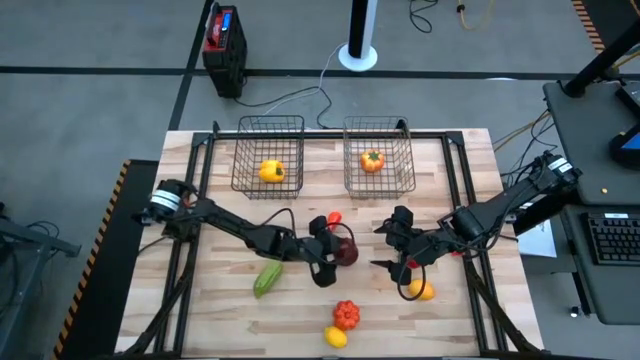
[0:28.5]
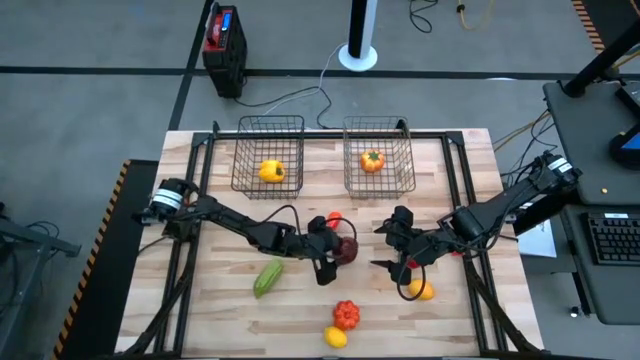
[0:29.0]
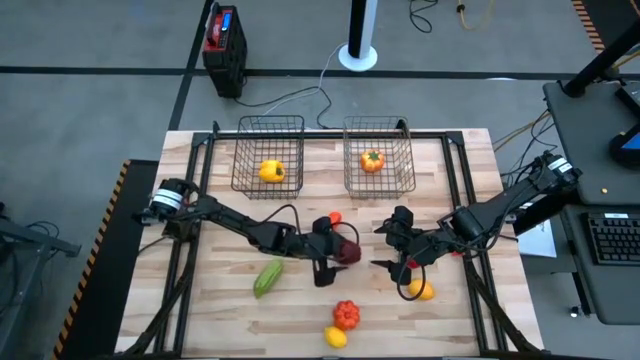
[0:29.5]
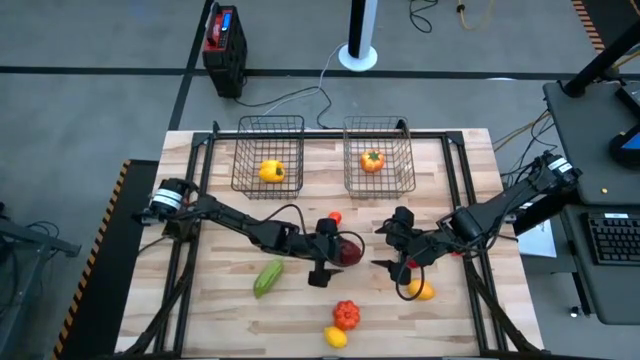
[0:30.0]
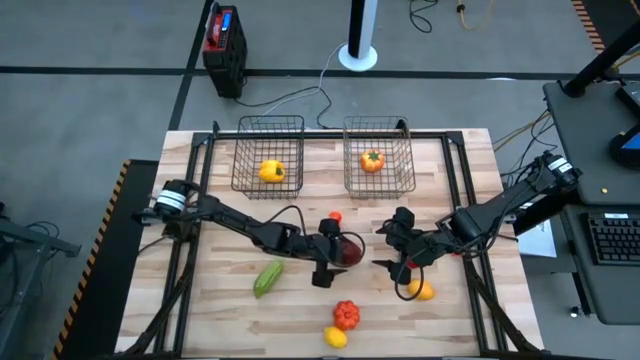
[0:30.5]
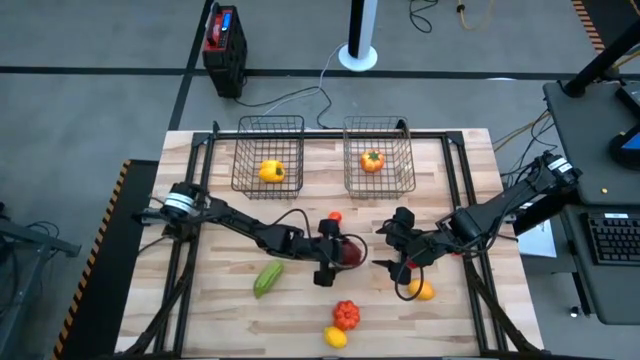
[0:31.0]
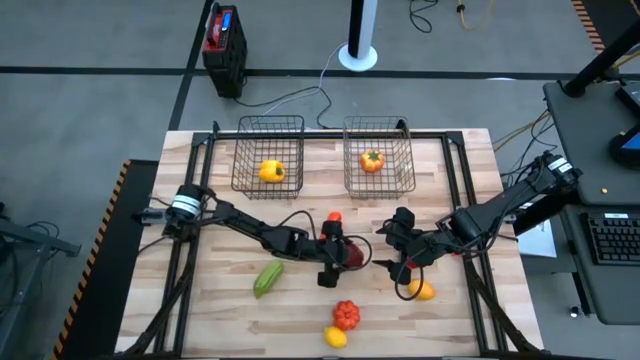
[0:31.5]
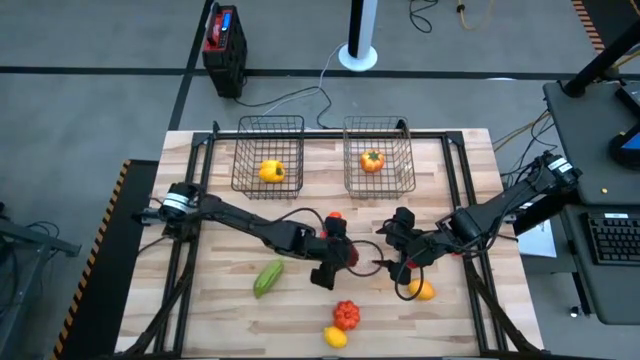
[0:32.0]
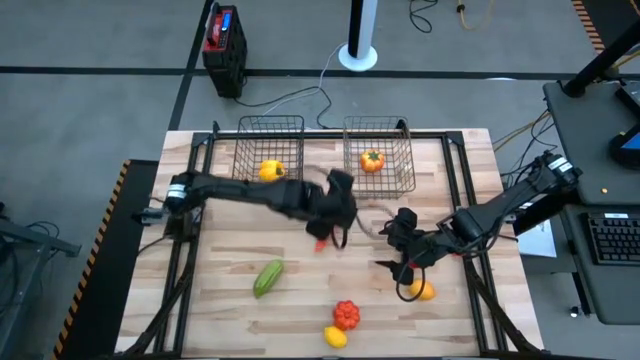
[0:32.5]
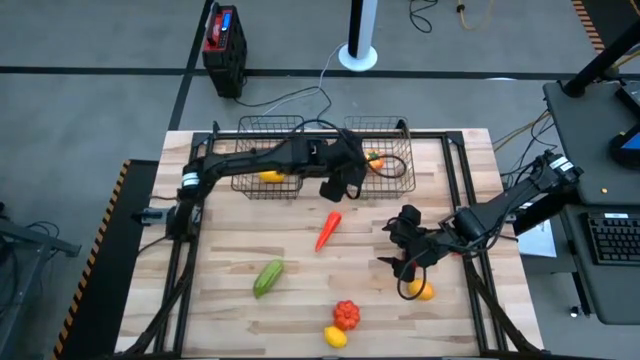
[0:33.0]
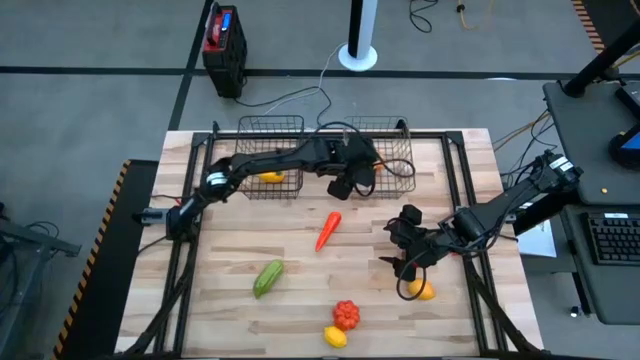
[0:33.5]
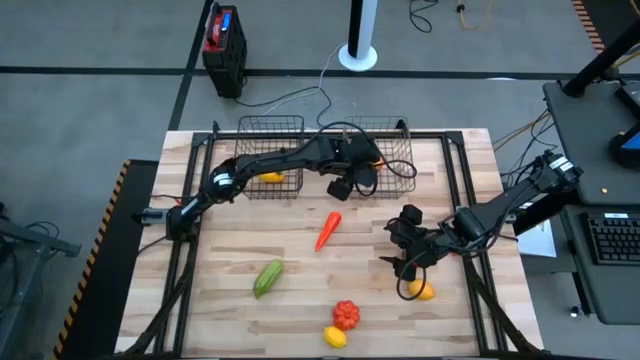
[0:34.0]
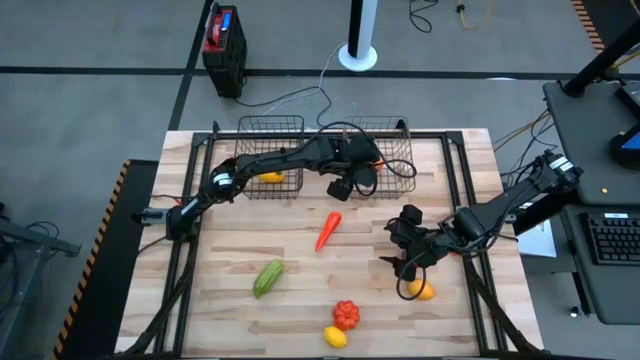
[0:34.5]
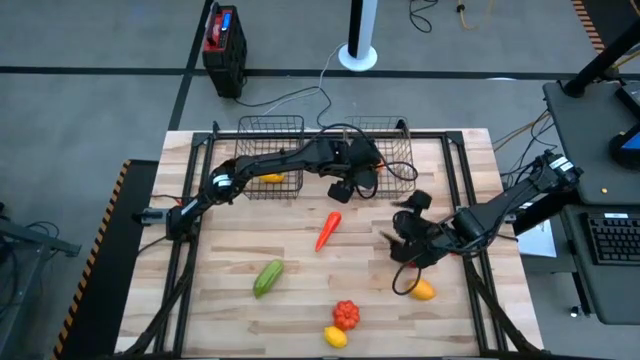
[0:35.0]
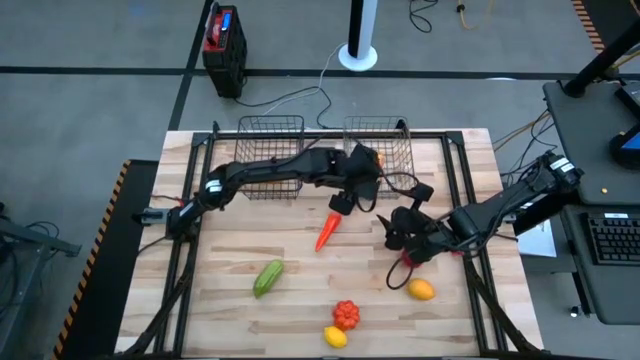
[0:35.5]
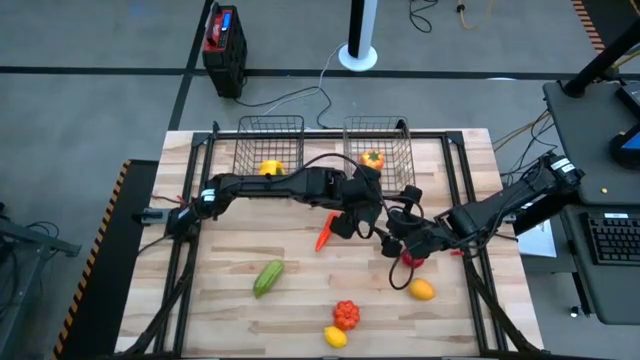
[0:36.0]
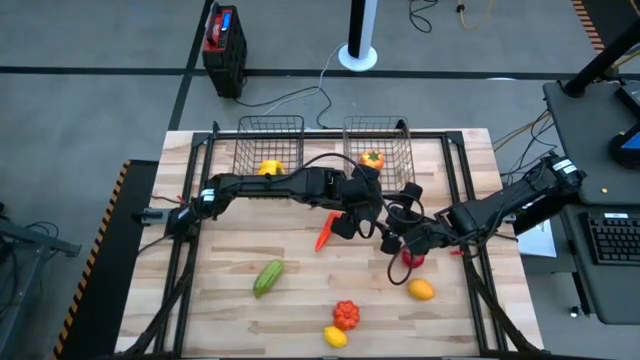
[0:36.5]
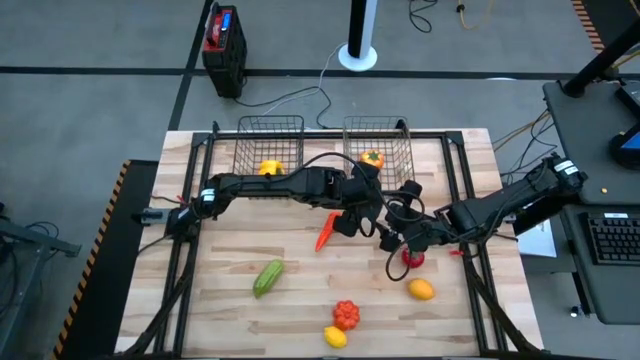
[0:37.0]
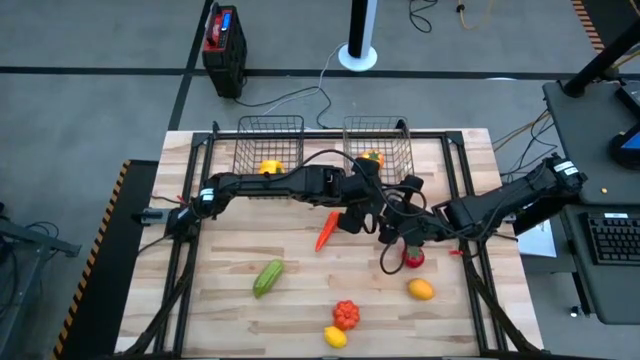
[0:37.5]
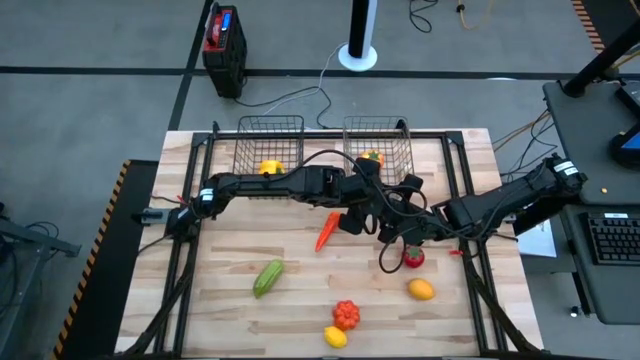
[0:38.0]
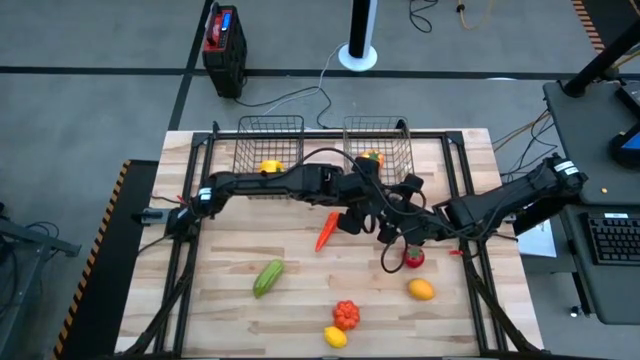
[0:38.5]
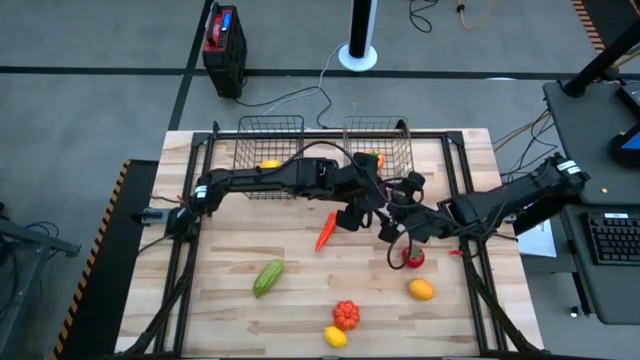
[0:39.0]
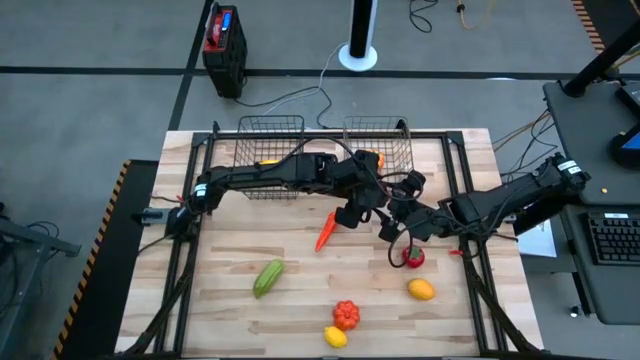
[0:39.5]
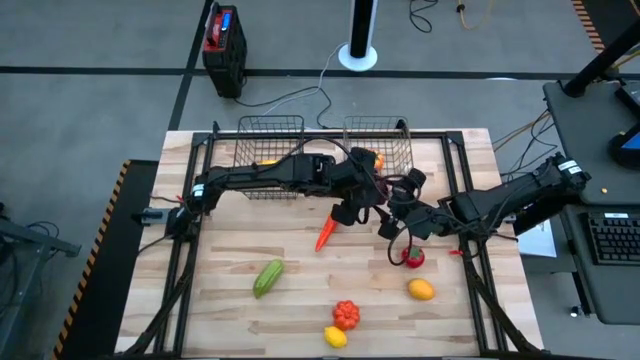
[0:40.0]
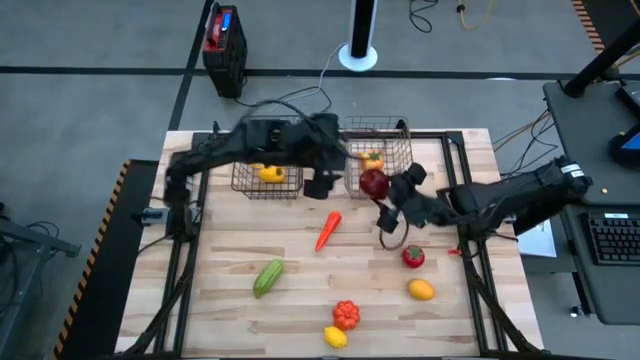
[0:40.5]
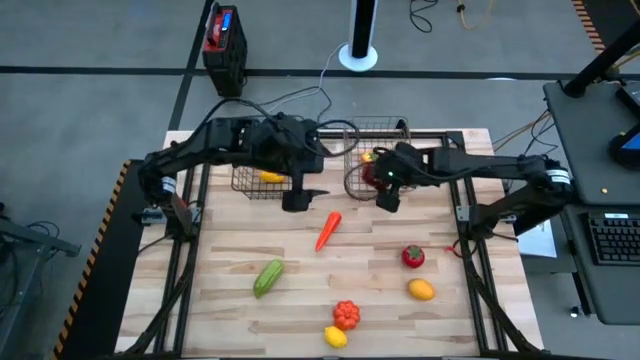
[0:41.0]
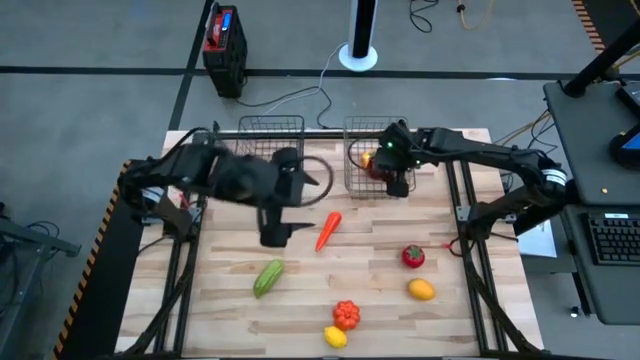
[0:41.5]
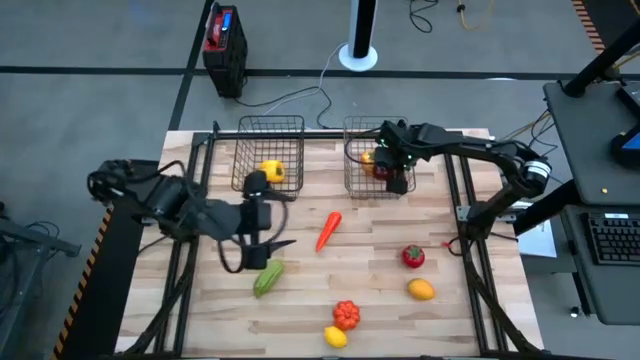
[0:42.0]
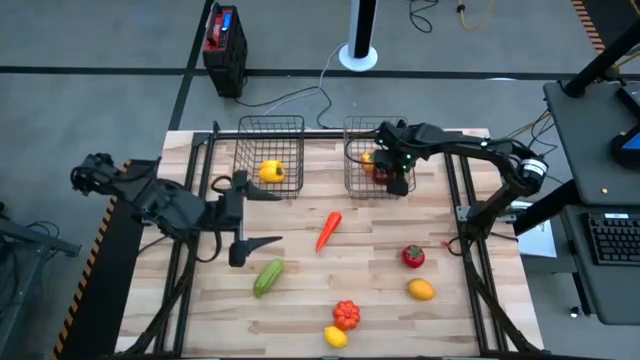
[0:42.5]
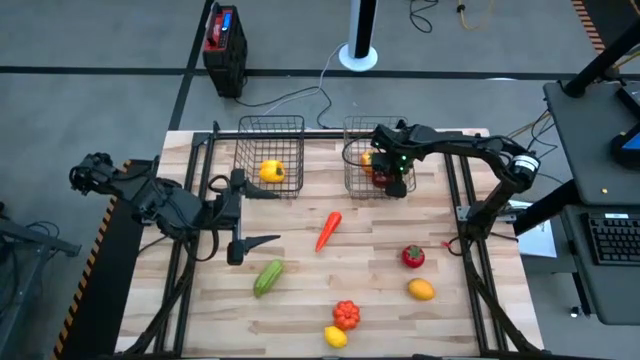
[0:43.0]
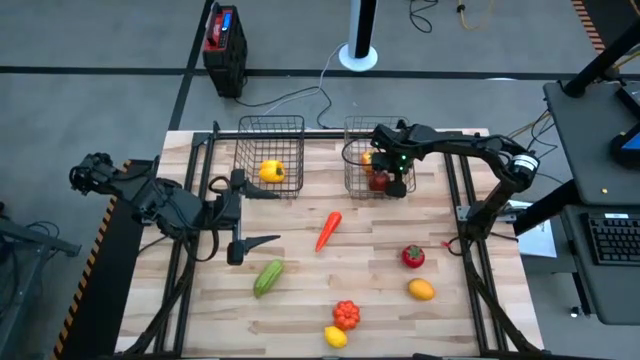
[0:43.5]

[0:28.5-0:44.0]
Task: Sort produce into baskets
Put the red apple into the gold wire basket

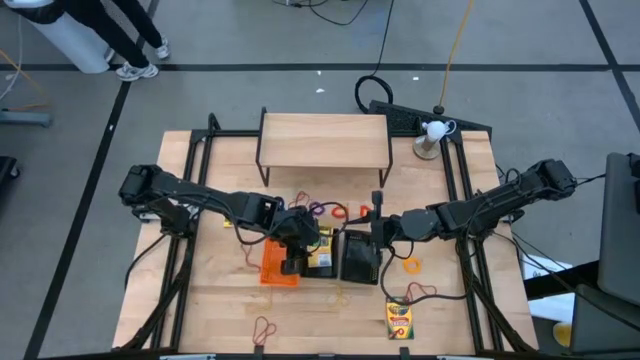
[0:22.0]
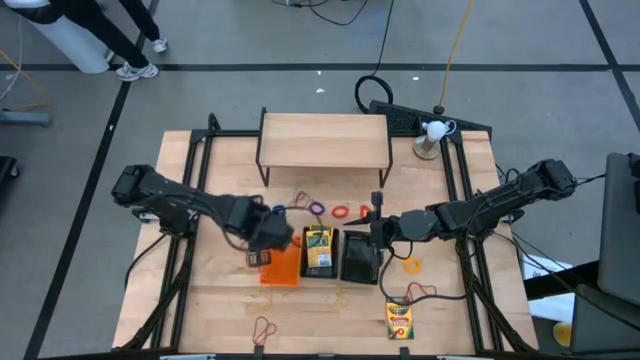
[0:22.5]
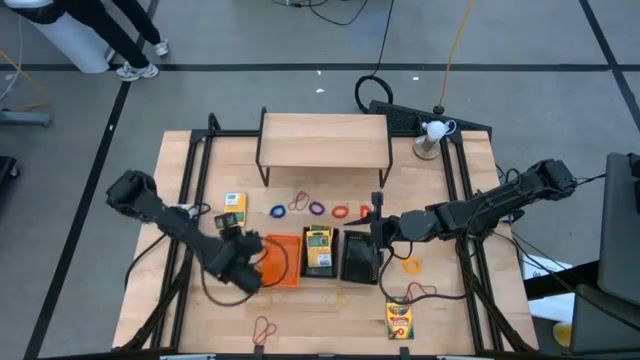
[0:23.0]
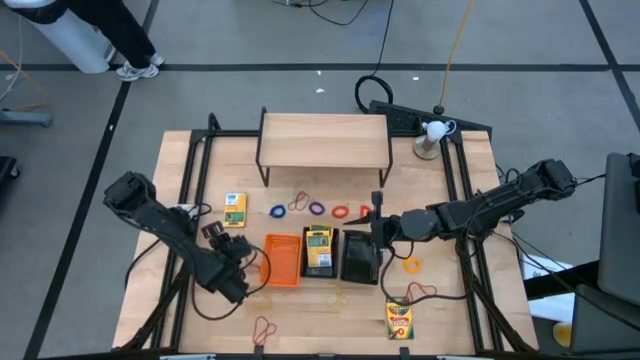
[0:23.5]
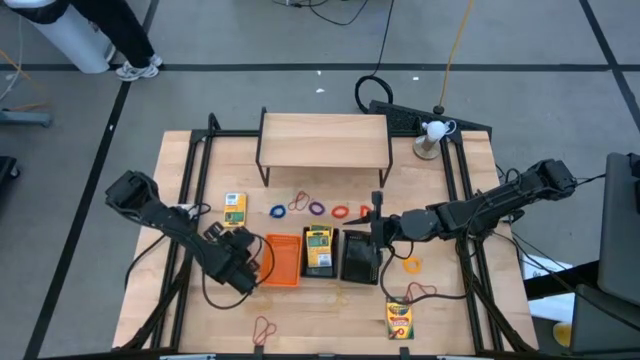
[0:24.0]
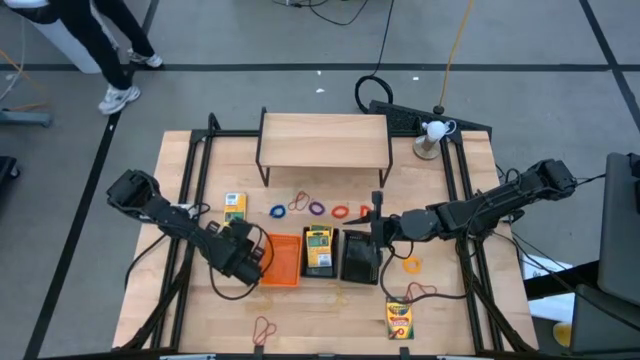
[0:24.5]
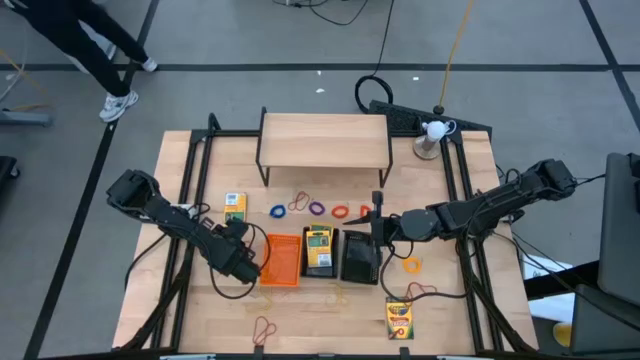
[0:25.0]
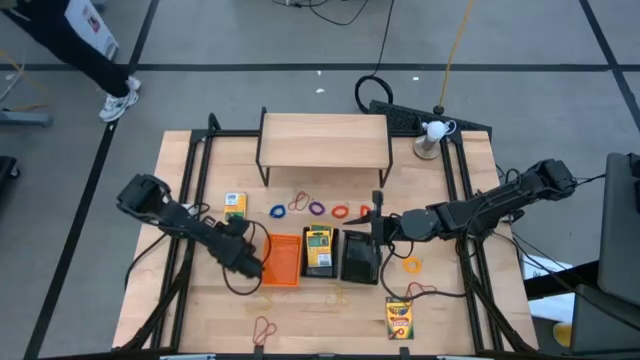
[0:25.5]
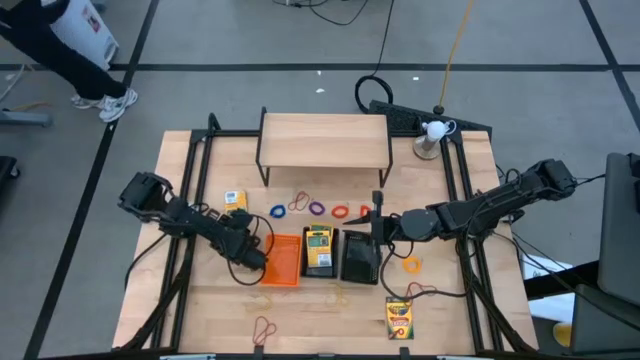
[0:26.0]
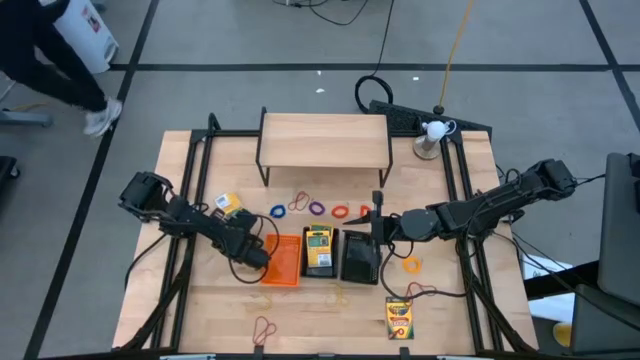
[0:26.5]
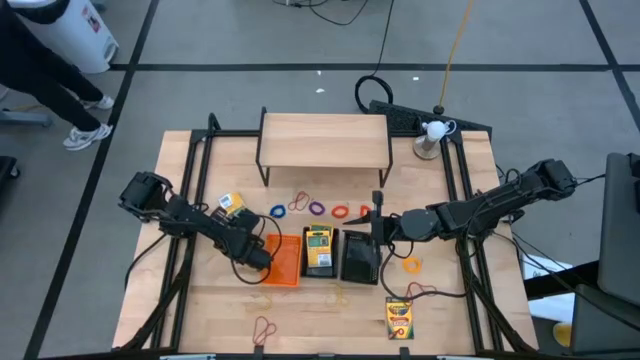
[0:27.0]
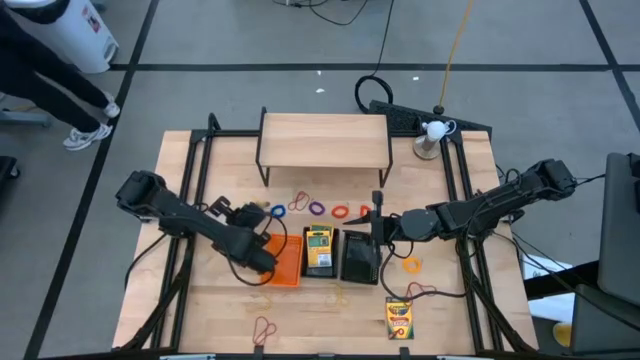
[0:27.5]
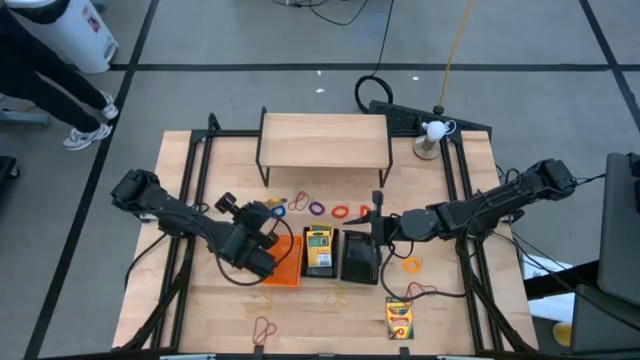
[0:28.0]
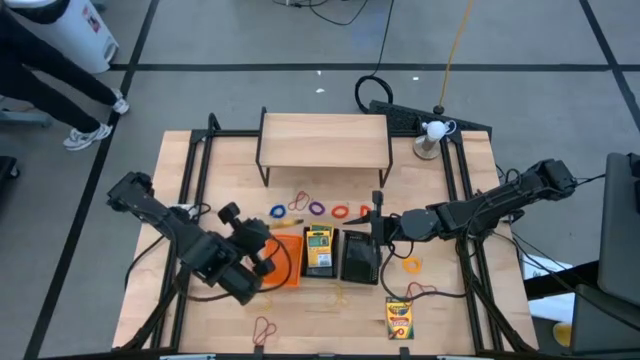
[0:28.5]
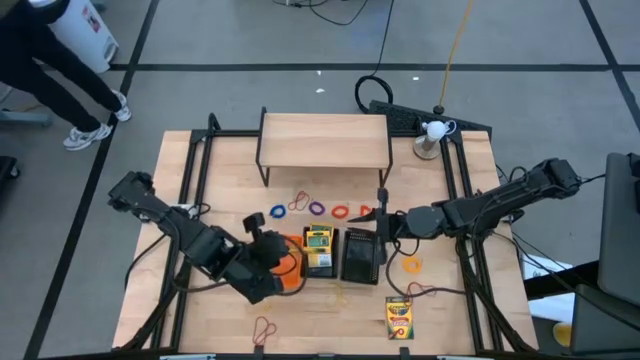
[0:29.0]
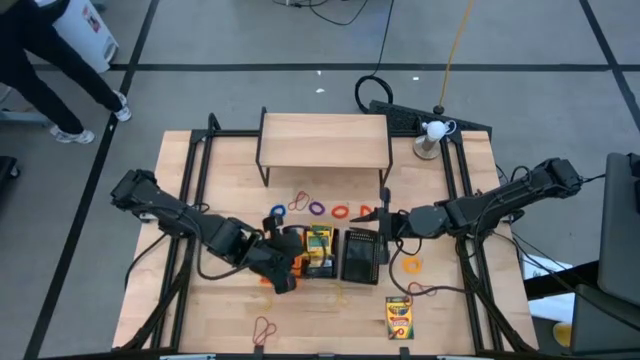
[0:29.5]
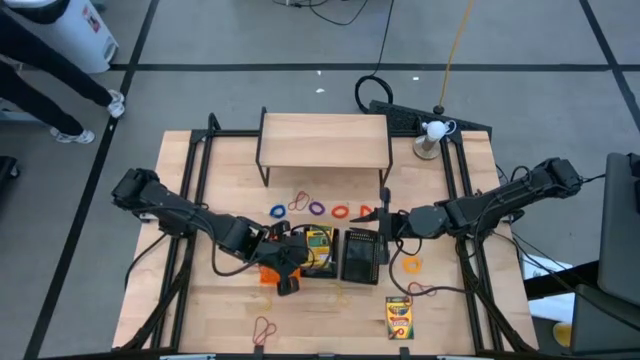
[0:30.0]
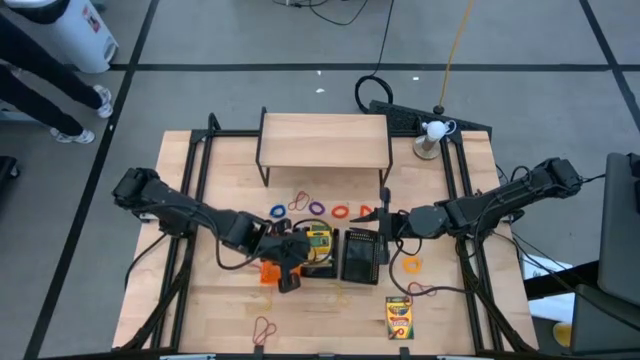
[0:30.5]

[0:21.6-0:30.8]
Task: Pick & Place Office Desk Supplies
Put the crayon box into the left black bin
